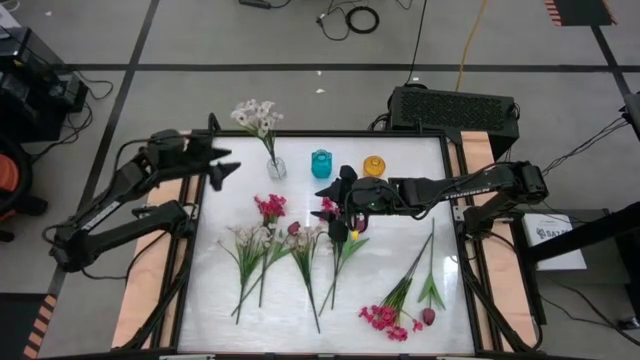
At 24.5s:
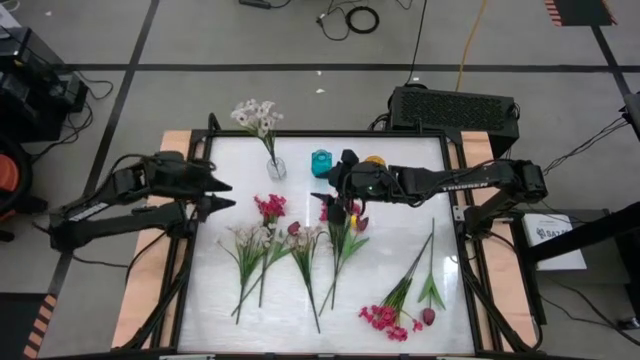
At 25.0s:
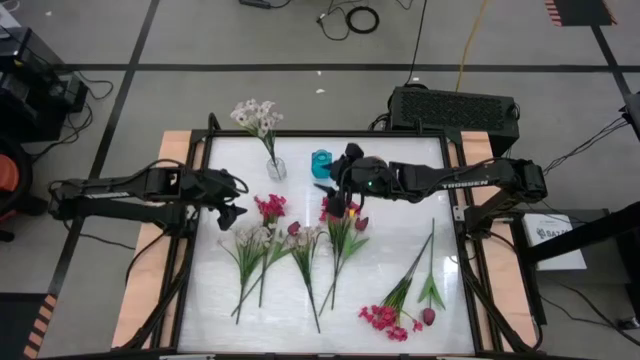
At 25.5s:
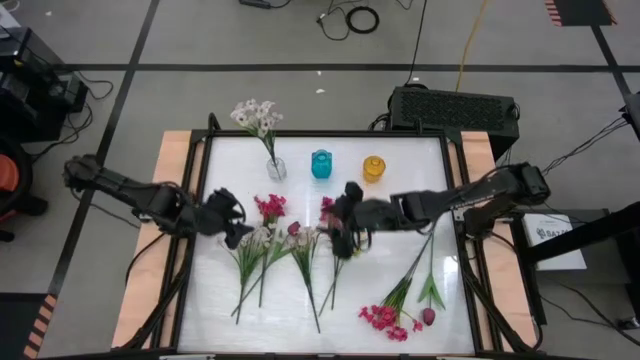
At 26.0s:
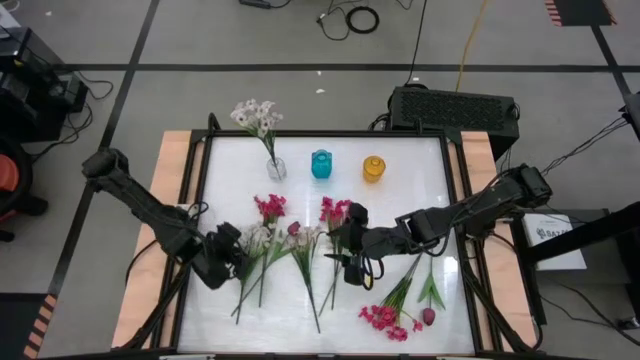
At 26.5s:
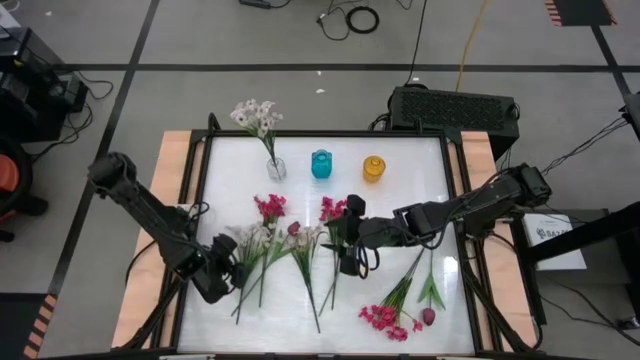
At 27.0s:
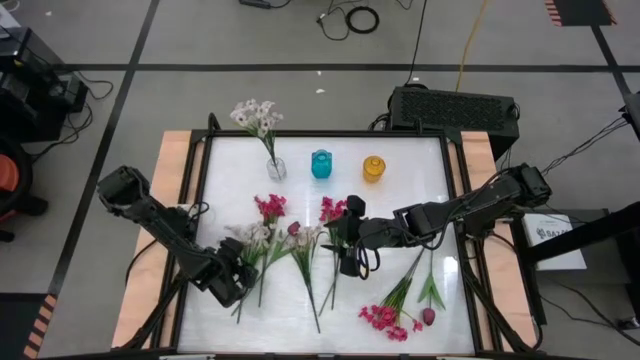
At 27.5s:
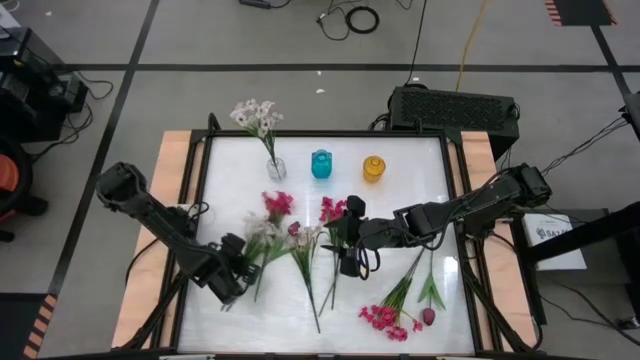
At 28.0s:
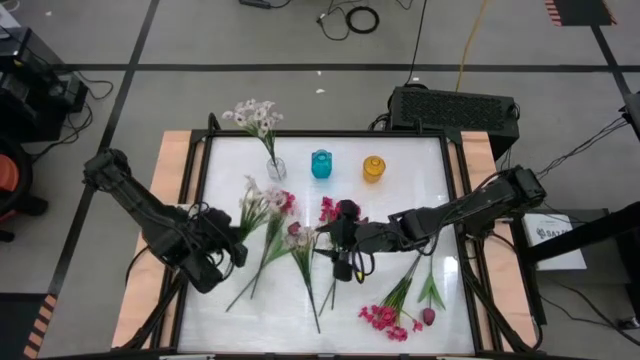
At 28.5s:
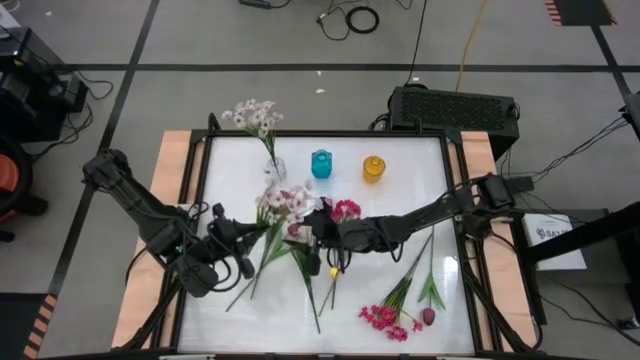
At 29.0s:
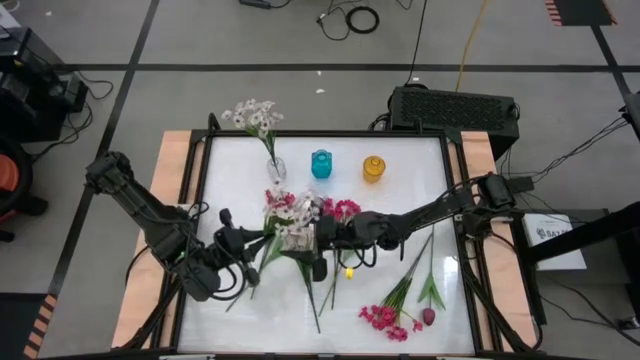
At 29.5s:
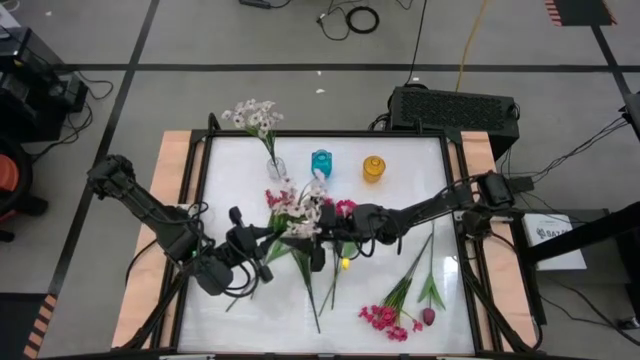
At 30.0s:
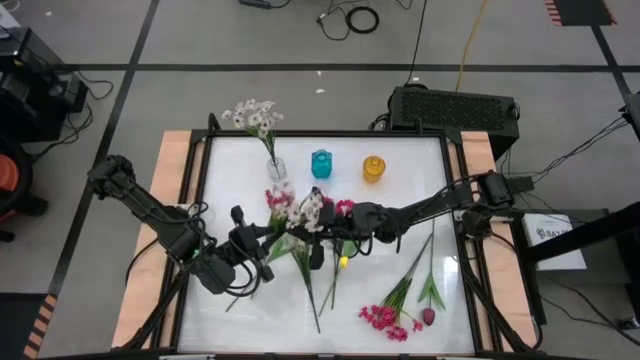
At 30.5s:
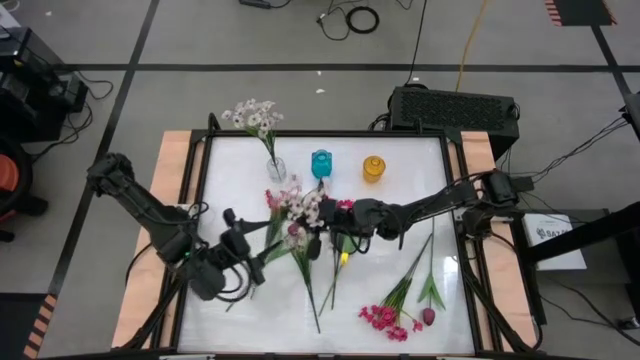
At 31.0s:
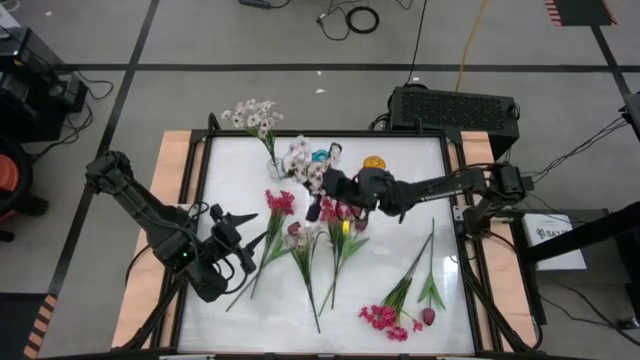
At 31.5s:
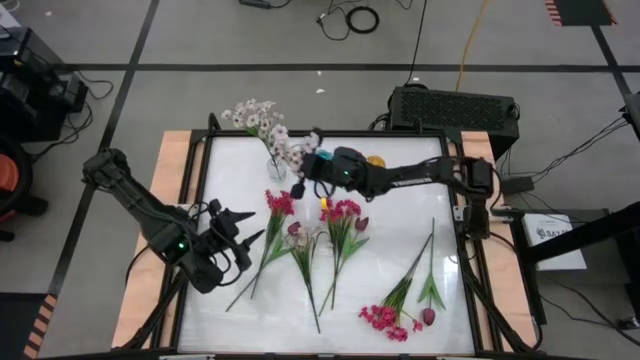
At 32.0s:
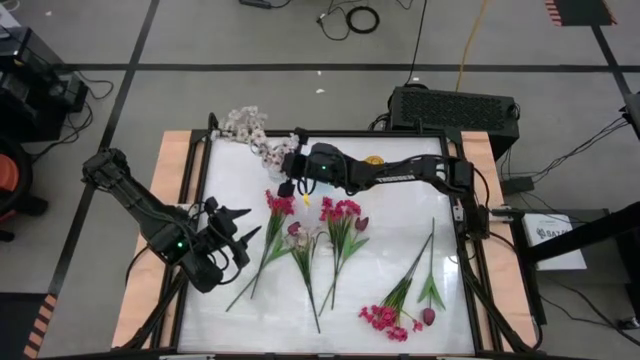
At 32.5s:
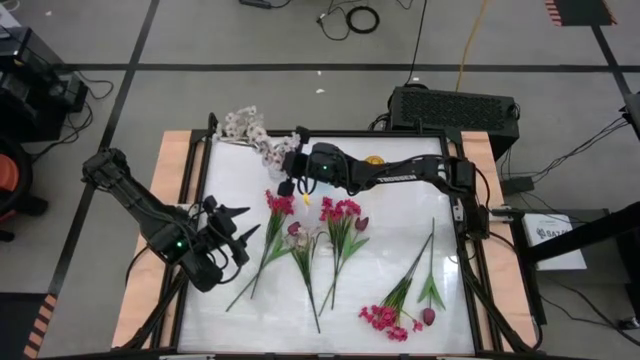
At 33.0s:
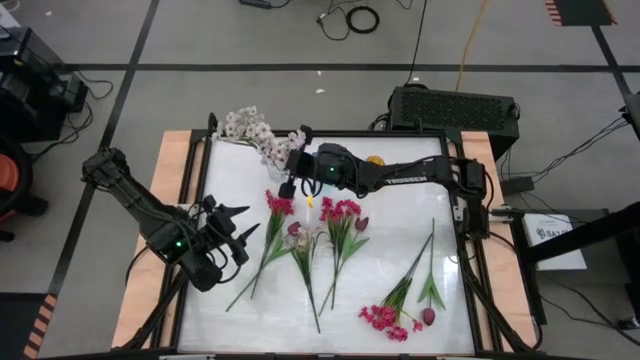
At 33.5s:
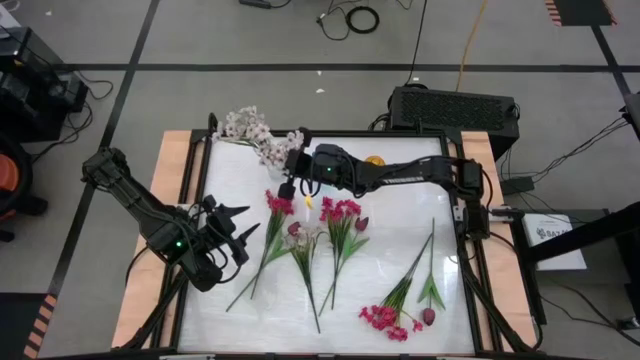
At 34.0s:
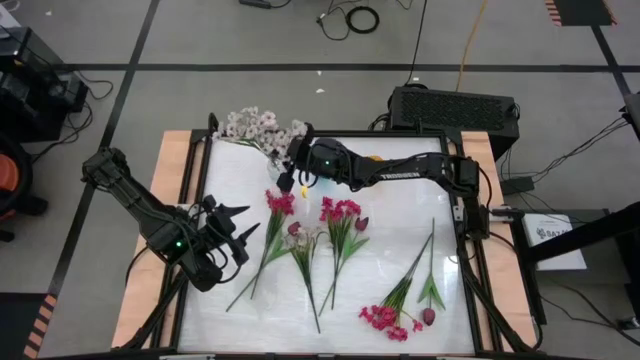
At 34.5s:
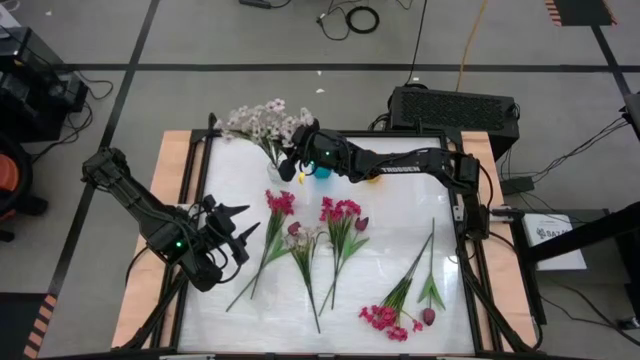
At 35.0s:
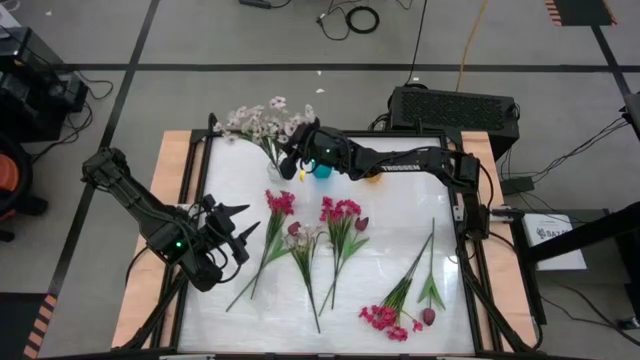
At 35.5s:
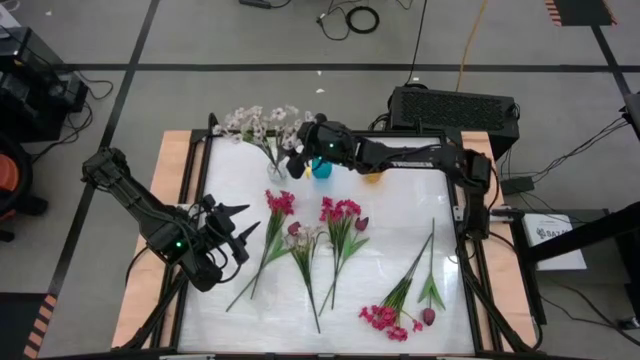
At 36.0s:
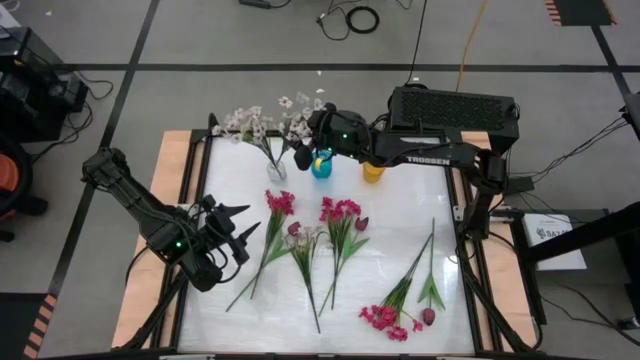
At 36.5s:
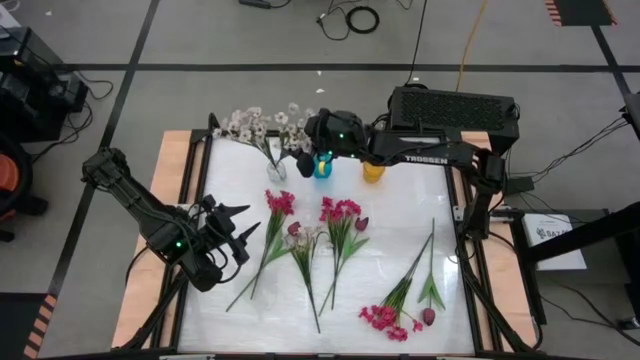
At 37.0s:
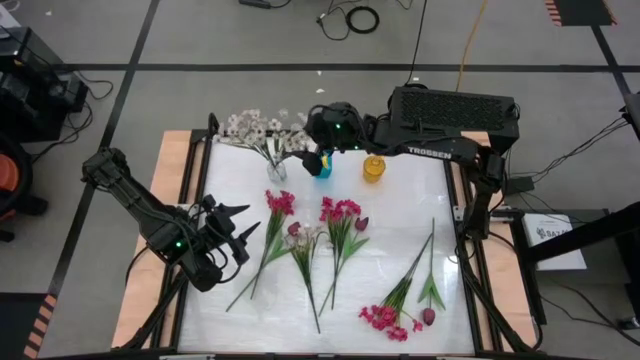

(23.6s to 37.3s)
Task: Sort flowers into vase by color
Put the left white flower into the transparent vase

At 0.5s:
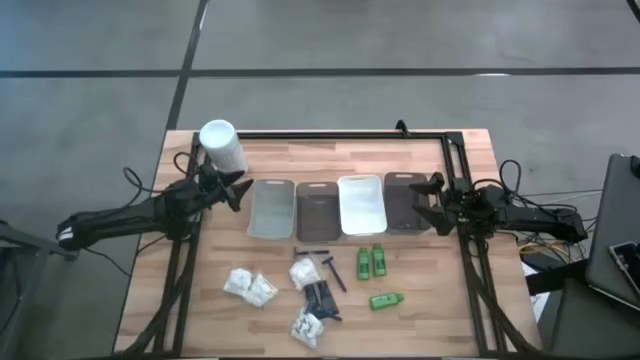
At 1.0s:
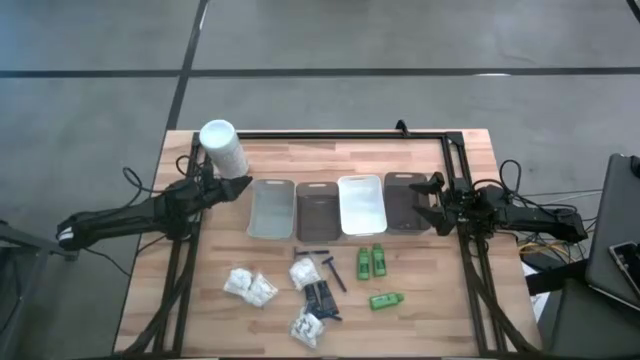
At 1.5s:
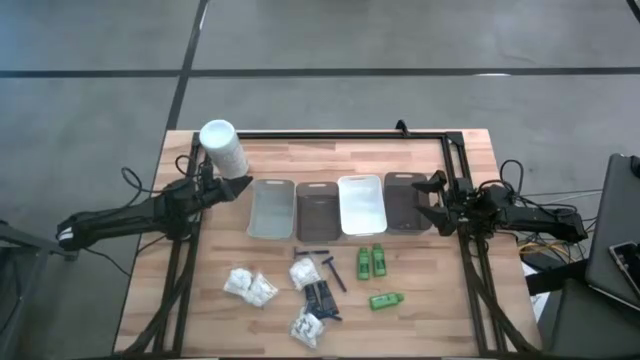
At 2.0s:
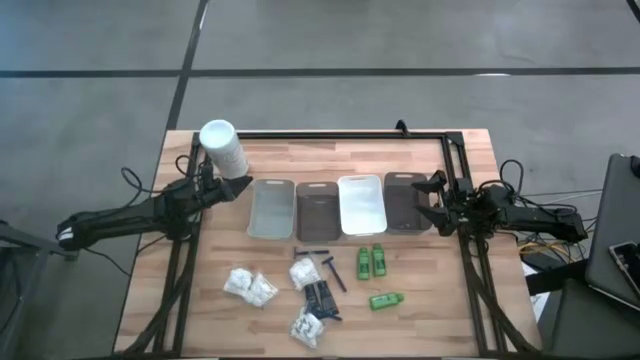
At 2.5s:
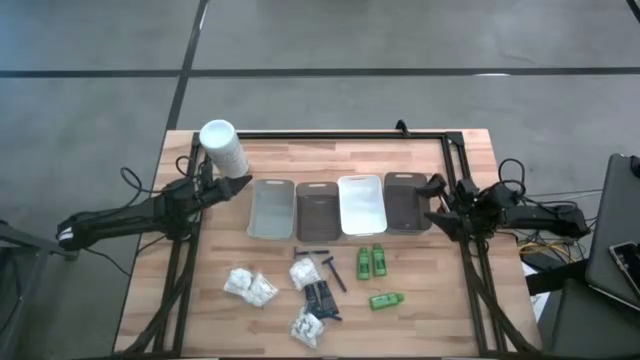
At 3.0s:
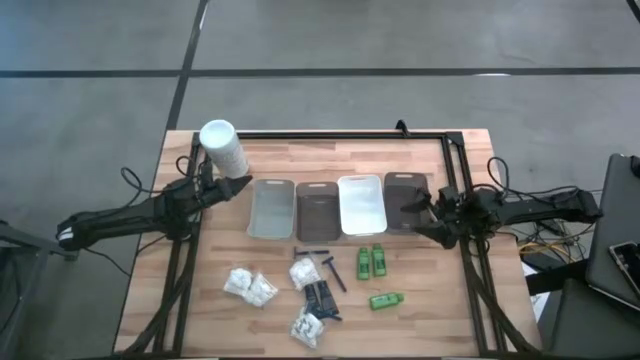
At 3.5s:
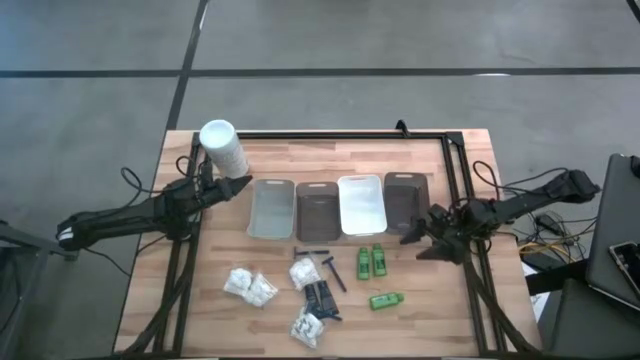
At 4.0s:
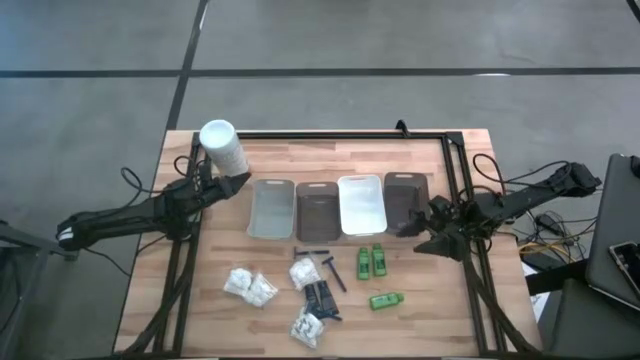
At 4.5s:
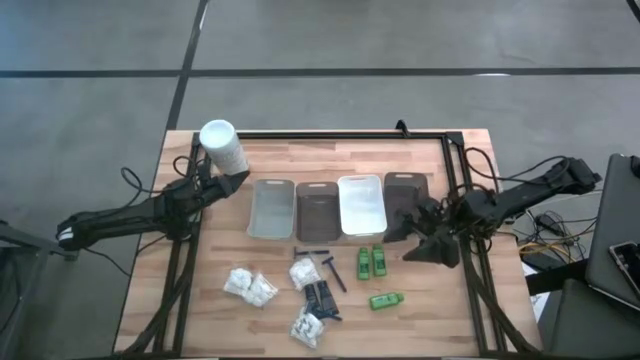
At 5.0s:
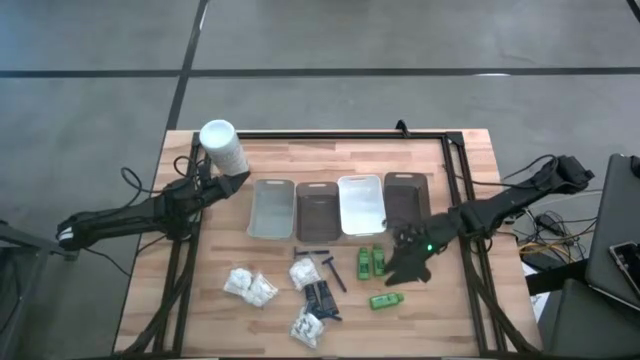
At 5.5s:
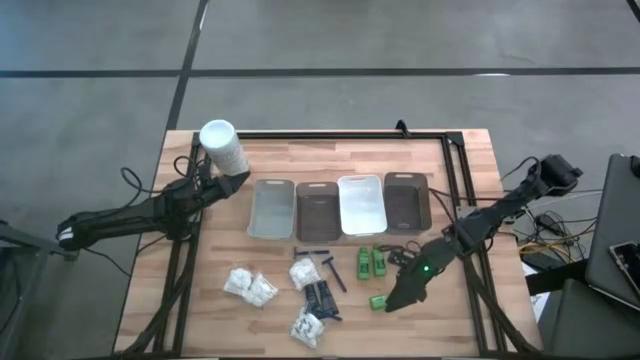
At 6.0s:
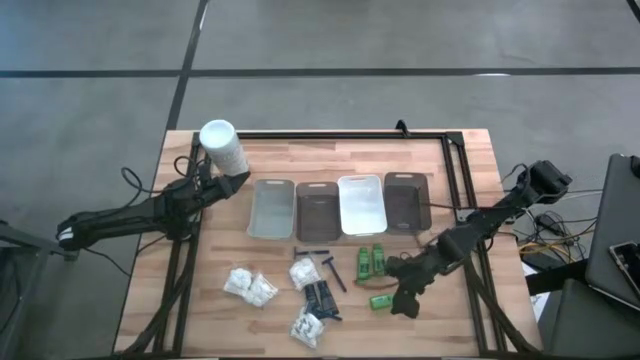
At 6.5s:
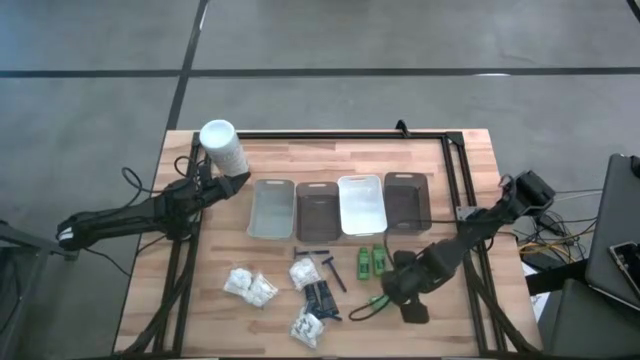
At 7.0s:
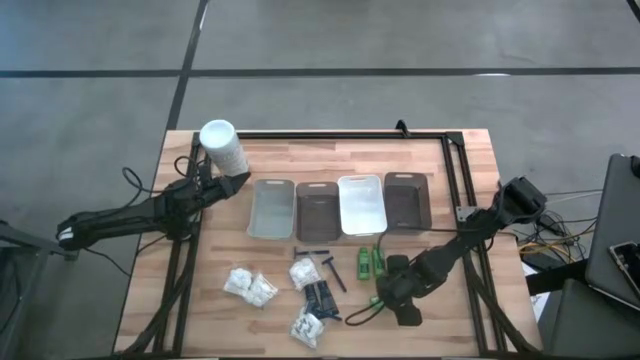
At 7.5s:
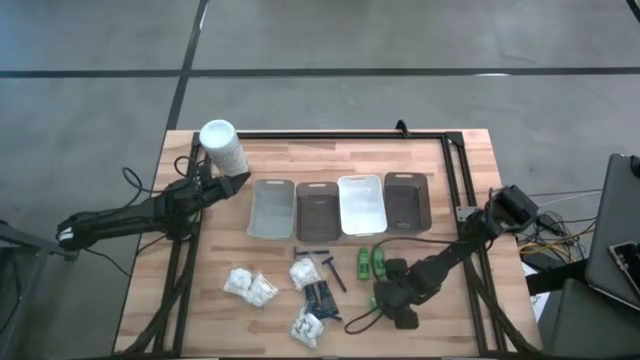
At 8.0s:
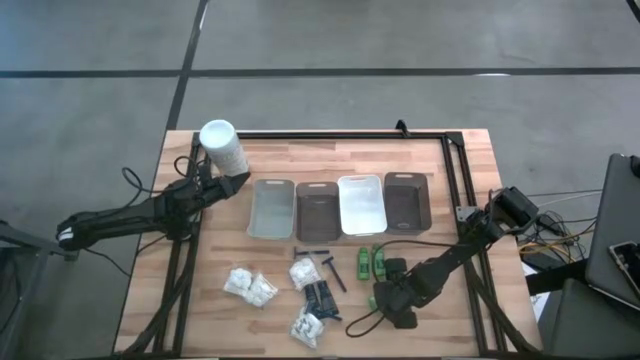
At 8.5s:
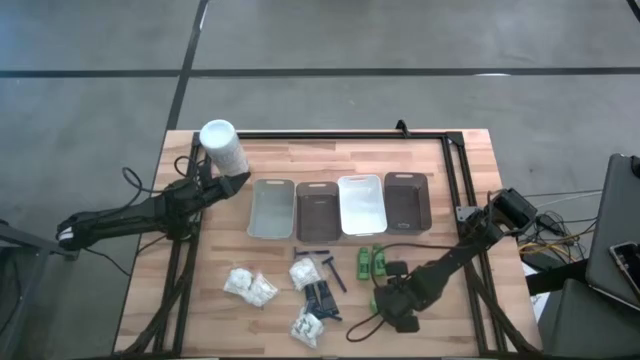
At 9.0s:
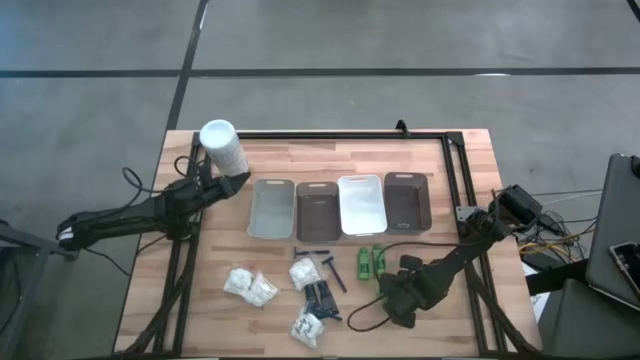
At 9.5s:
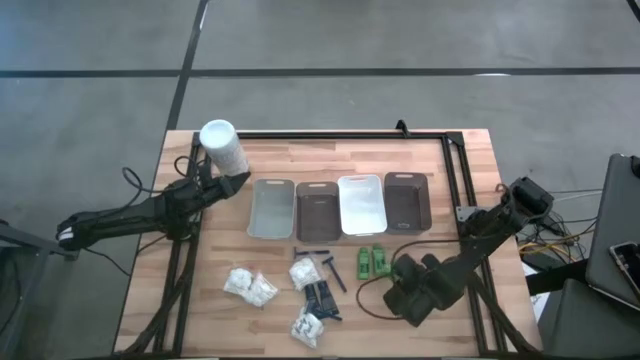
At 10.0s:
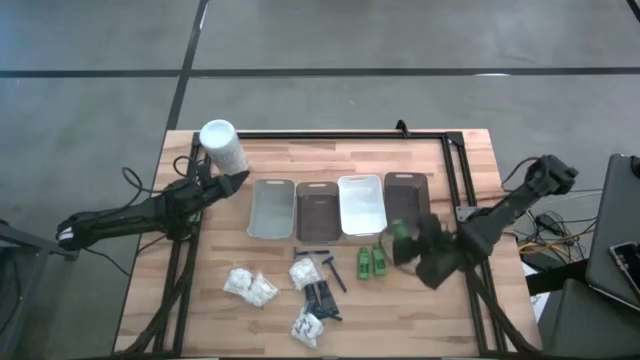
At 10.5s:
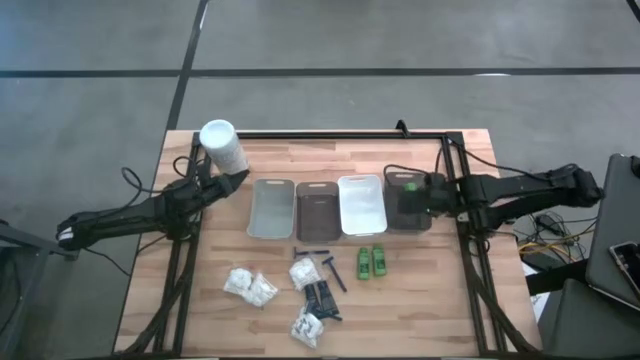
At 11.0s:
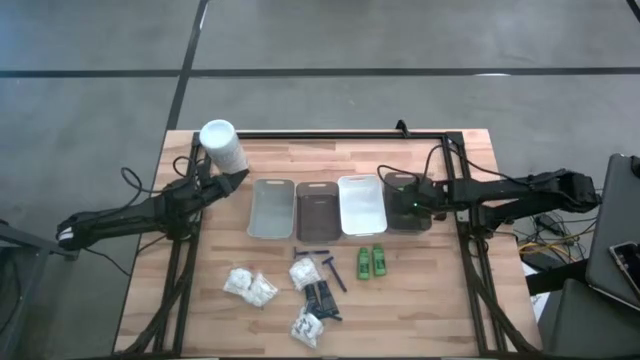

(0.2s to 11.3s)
Task: Pick & Place Travel size toiletries
Put the green shampoo bottle into the right black bin
